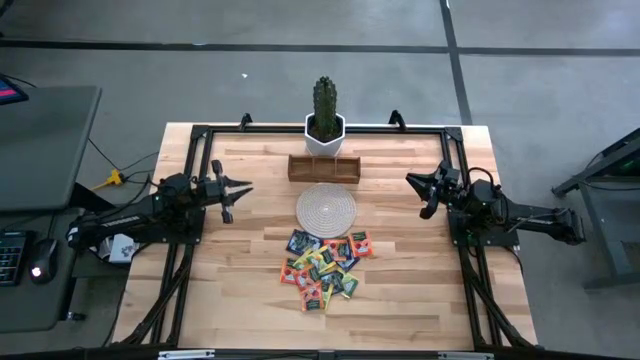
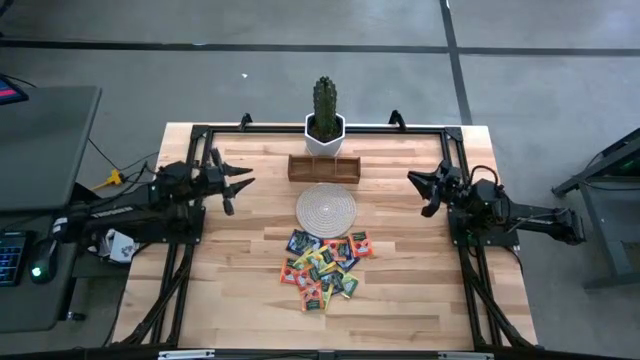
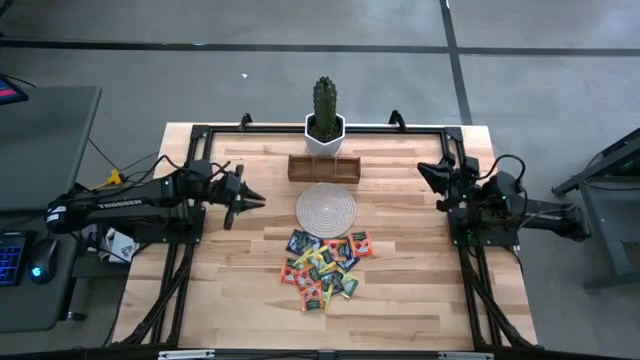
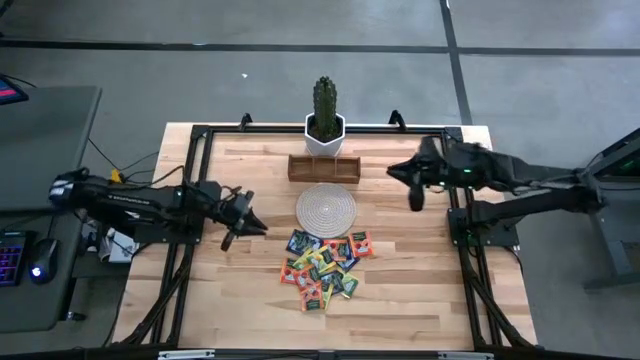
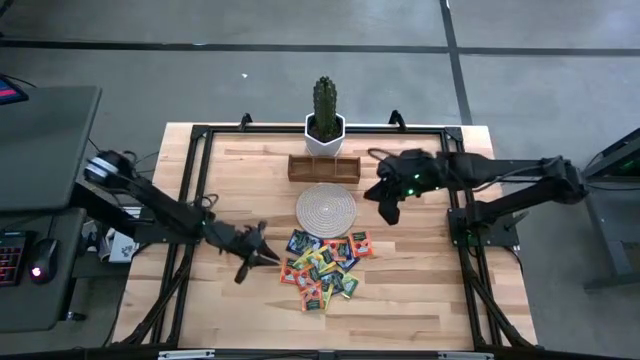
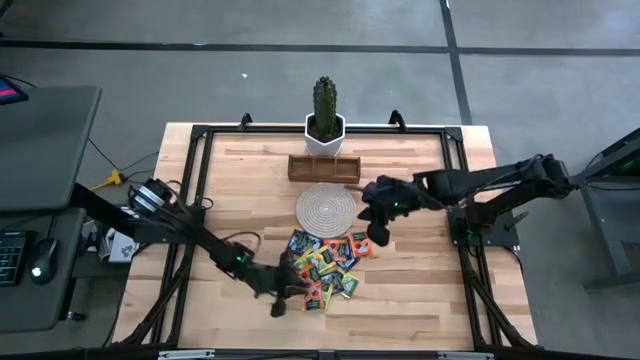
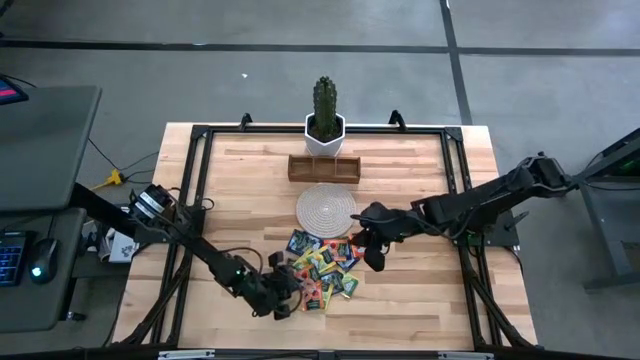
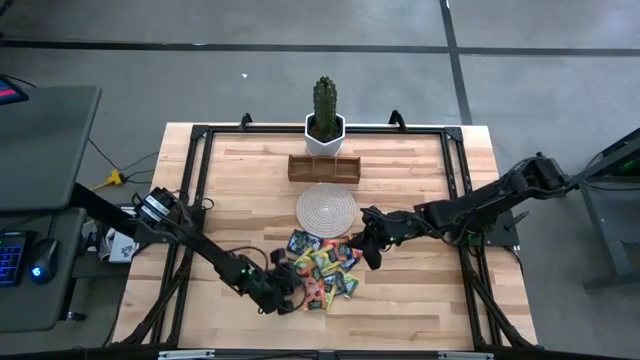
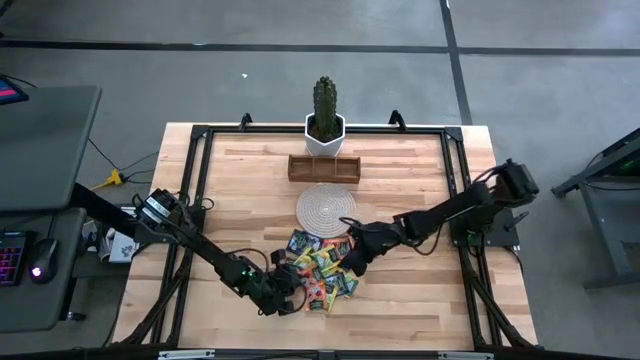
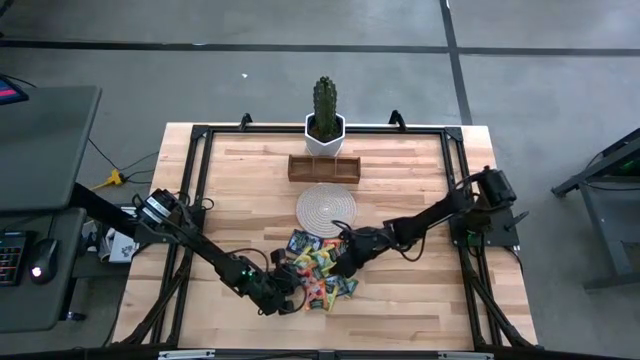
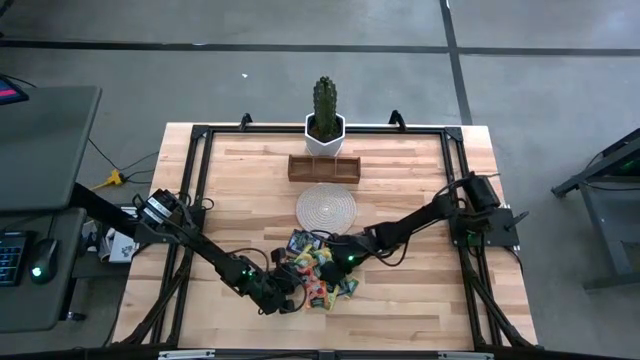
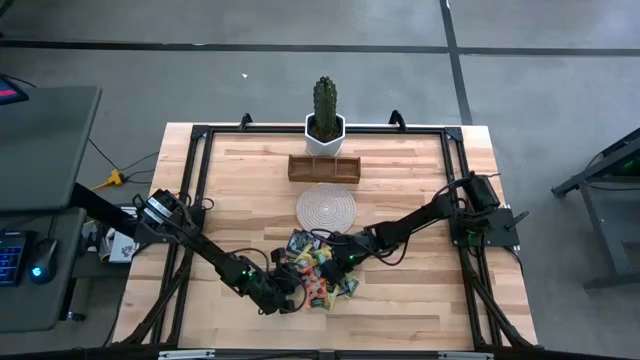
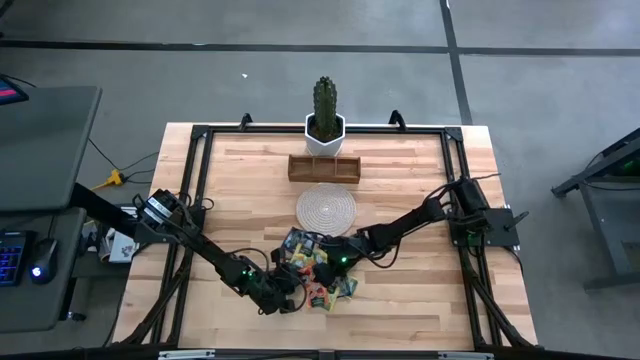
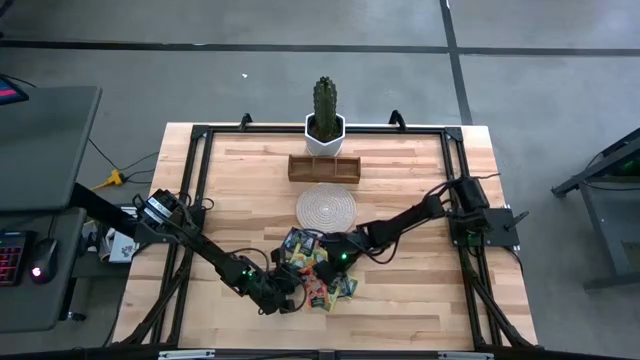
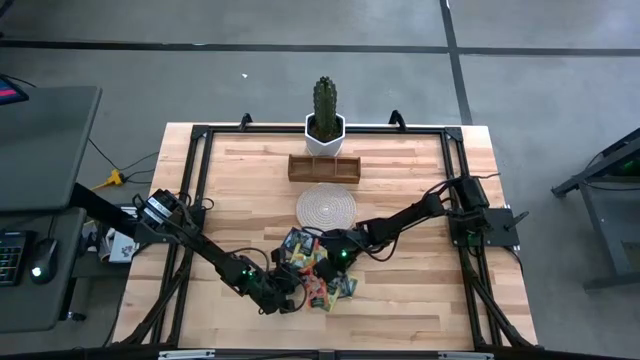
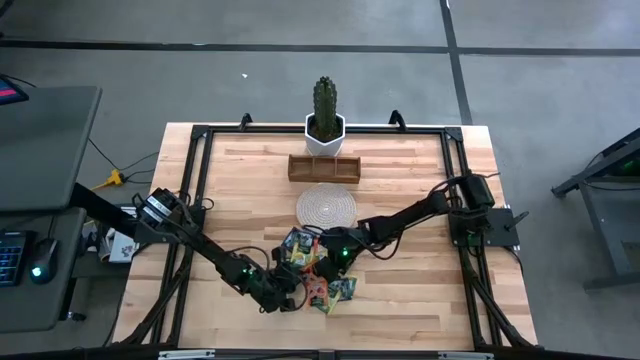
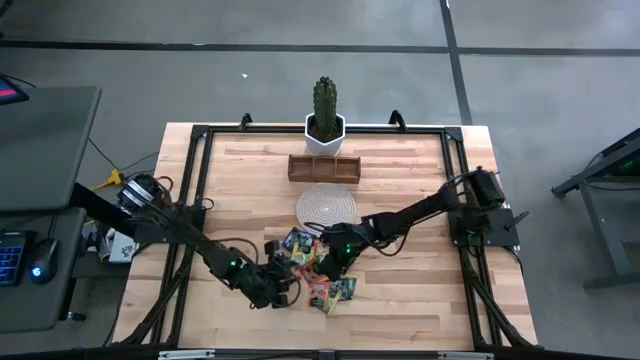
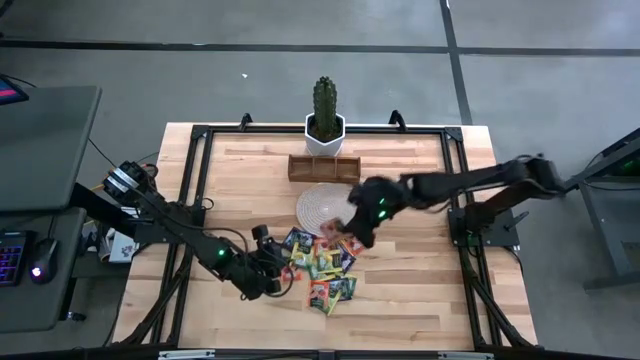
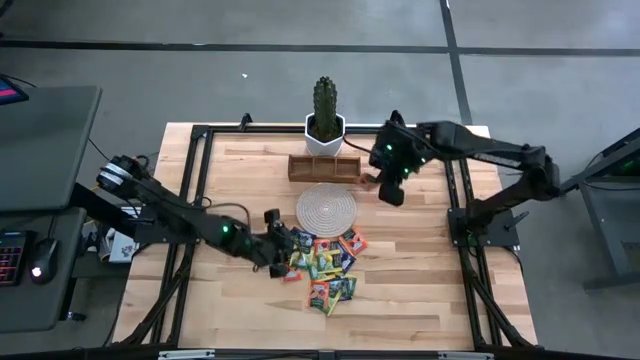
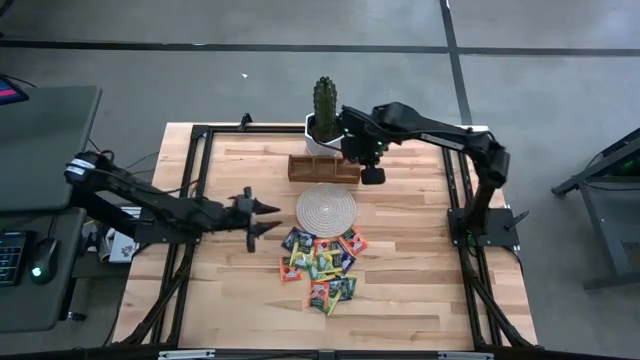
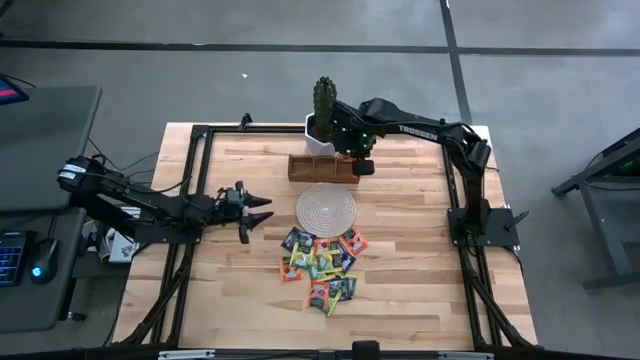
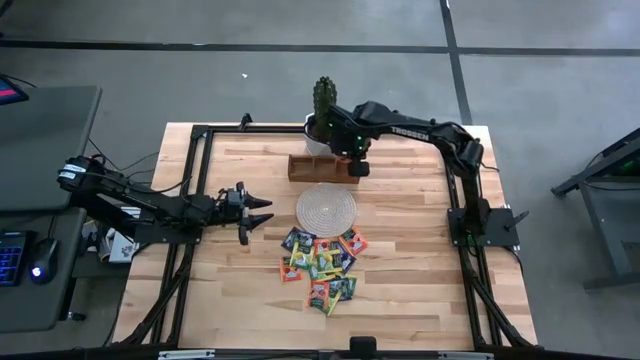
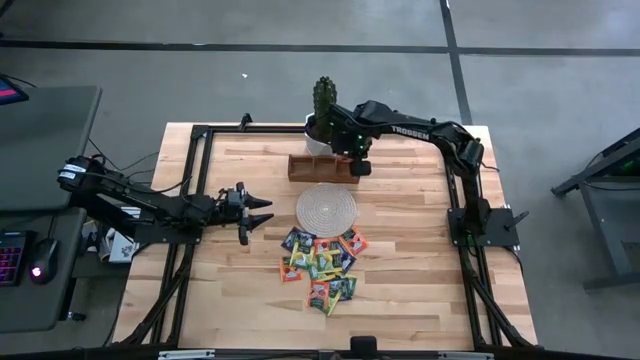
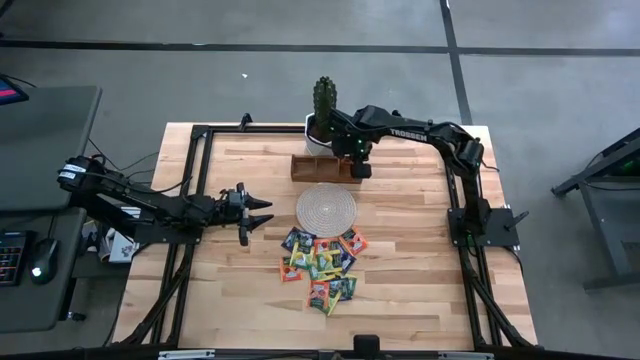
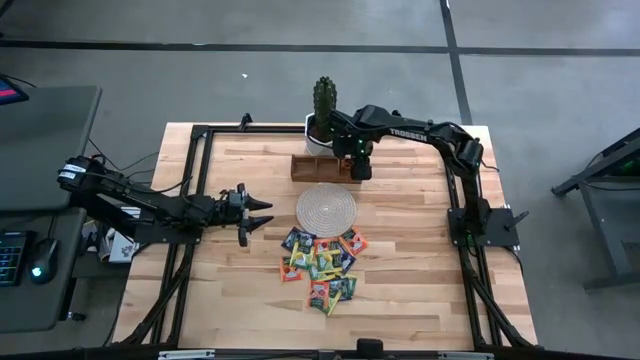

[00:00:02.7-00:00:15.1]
Task: Pick & Place Tea
Put the orange tea bag into the right section of the wooden organizer

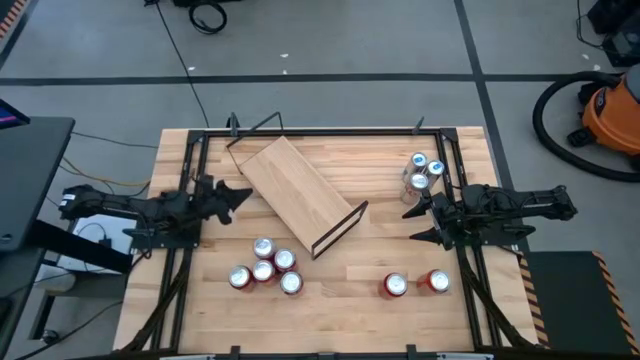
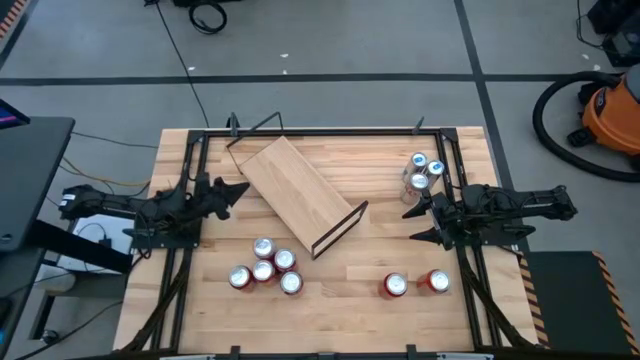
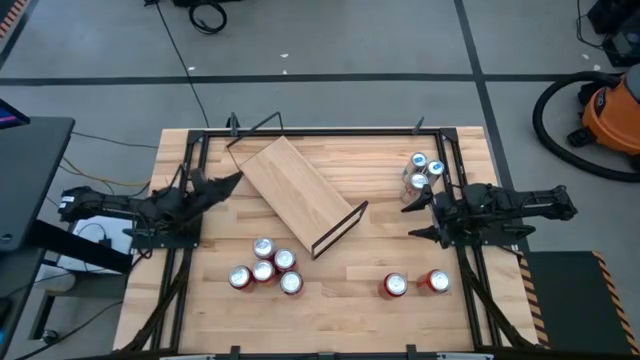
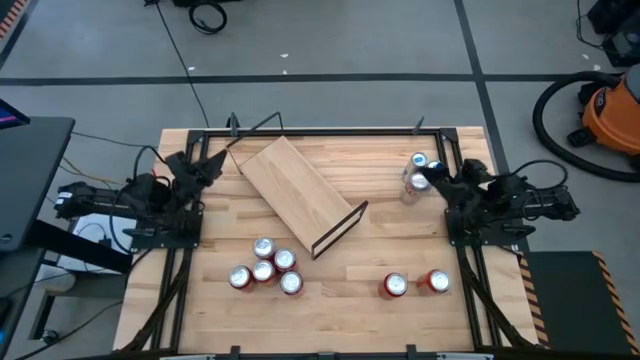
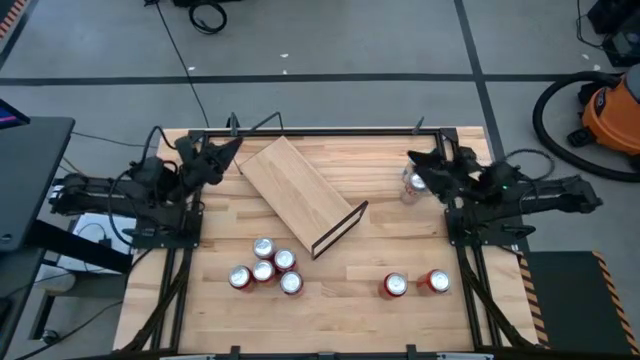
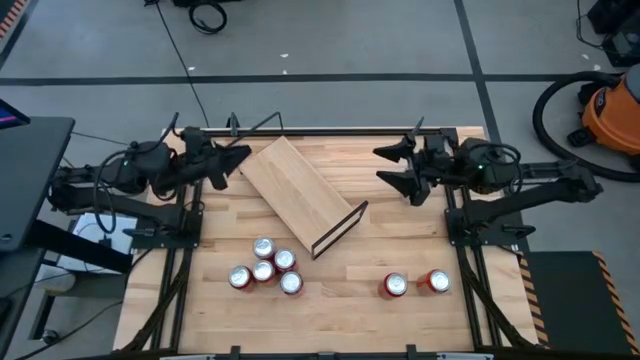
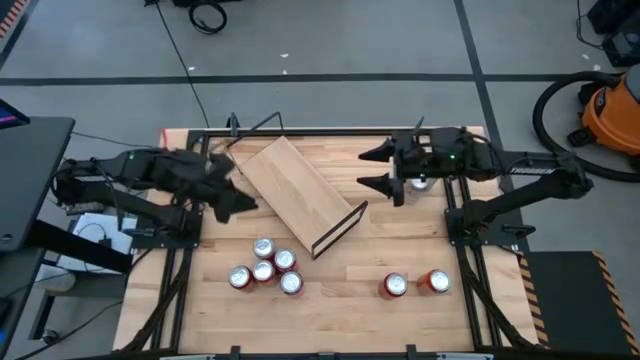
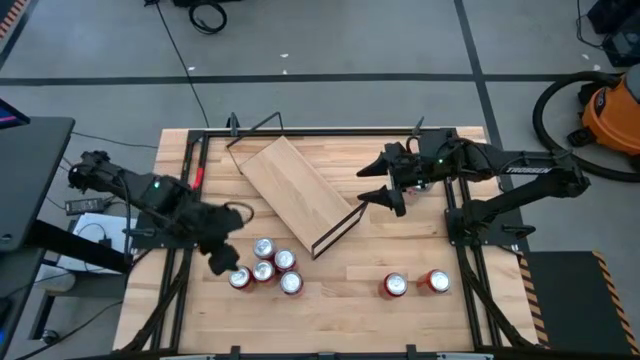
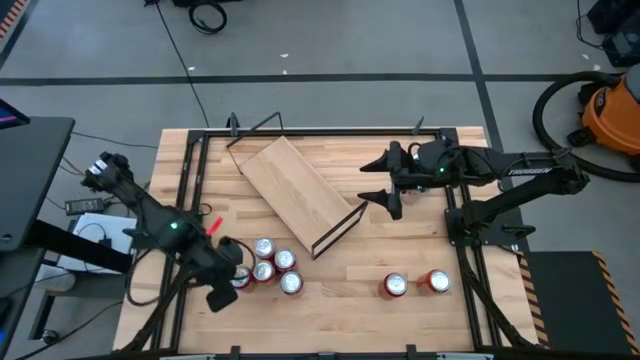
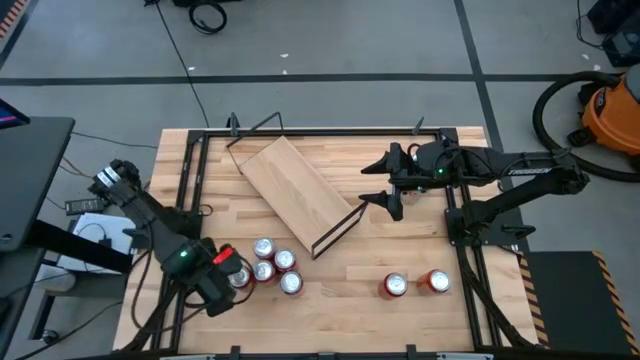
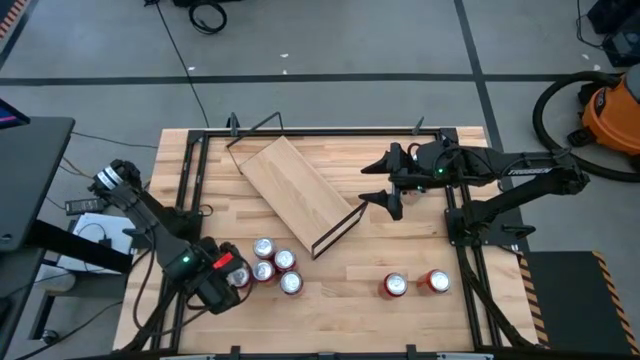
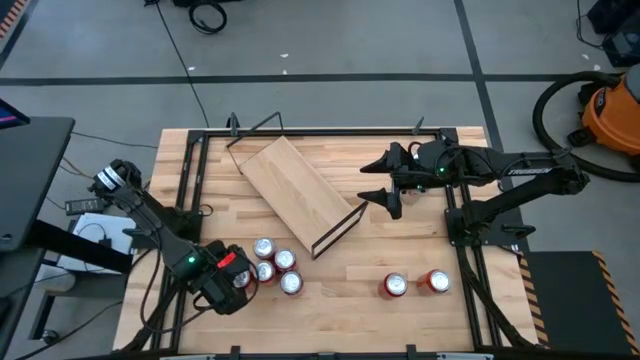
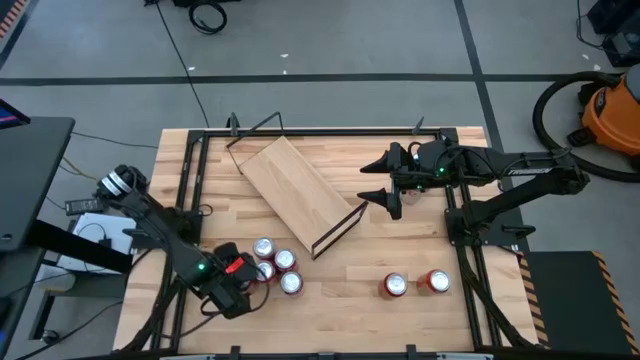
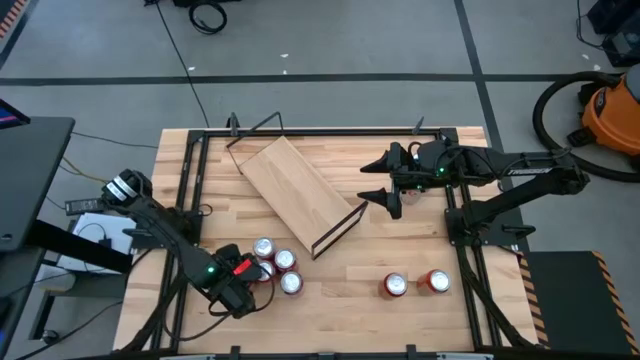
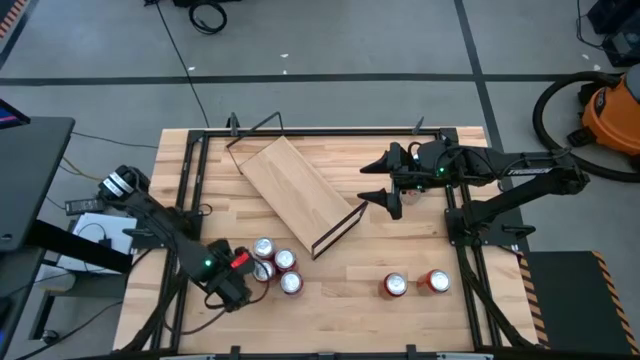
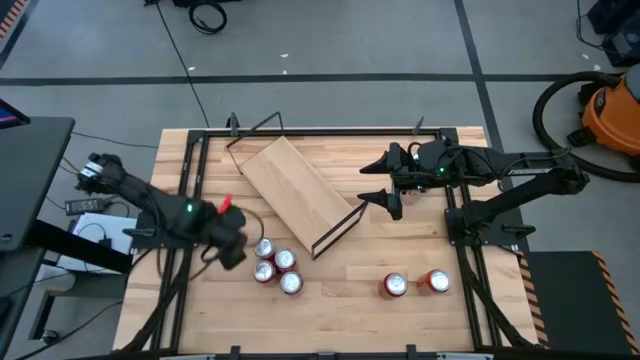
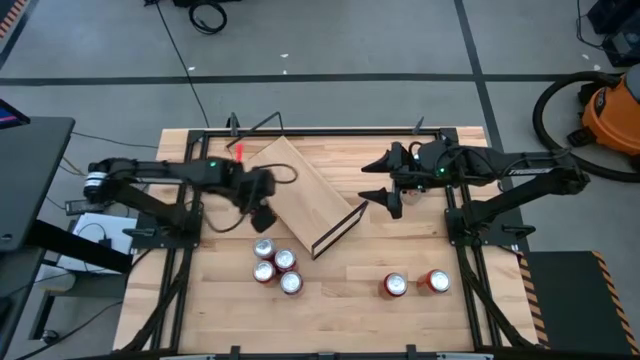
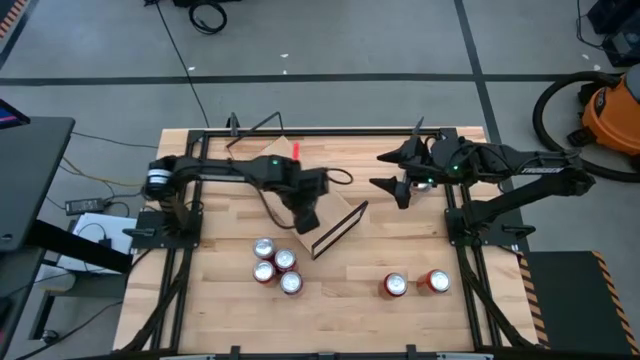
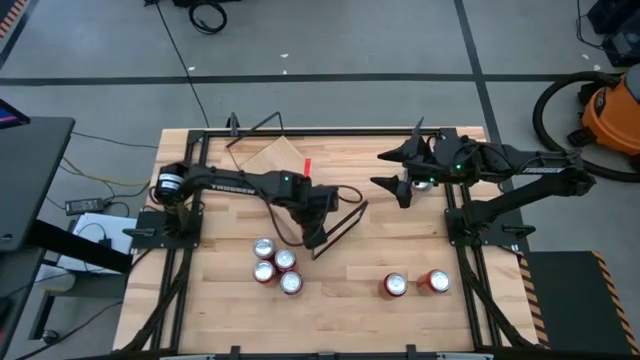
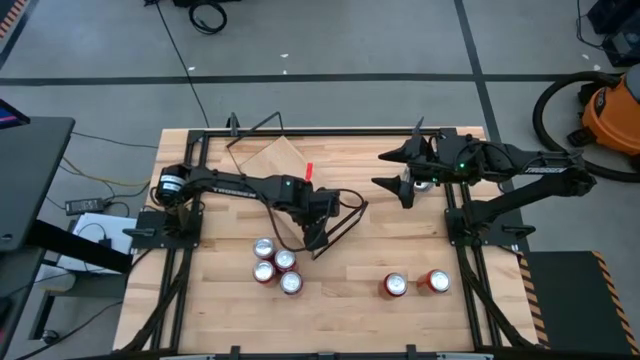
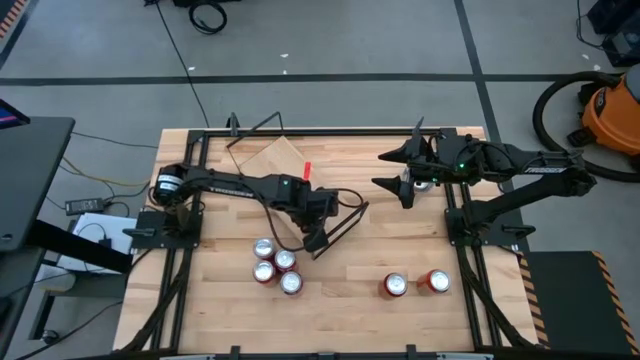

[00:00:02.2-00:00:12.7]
Task: Place canned beverage on shelf
Put the left red and black soda can on the shelf
